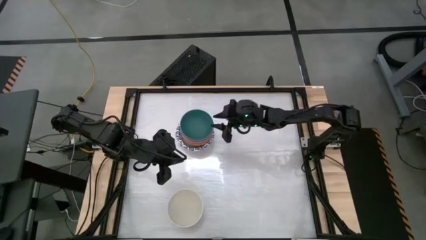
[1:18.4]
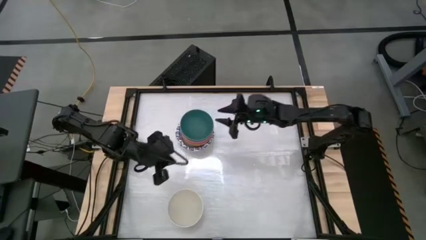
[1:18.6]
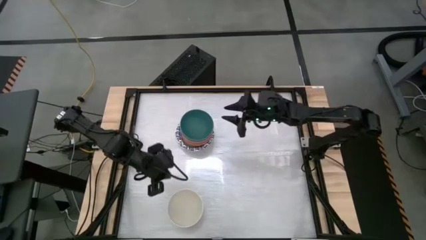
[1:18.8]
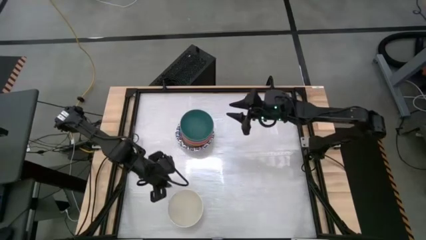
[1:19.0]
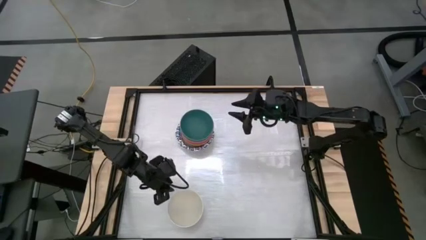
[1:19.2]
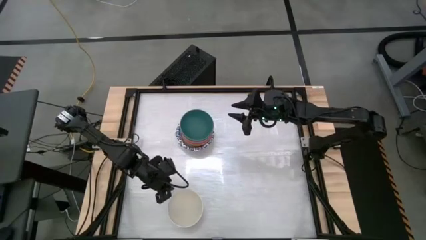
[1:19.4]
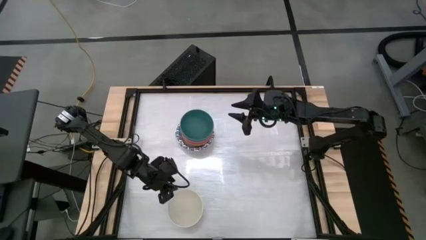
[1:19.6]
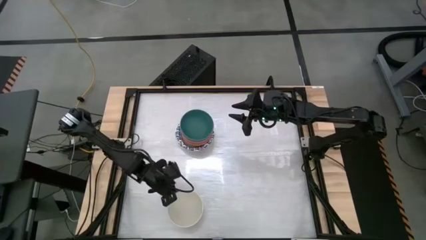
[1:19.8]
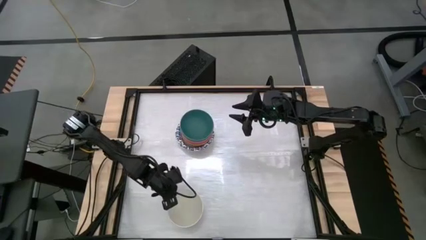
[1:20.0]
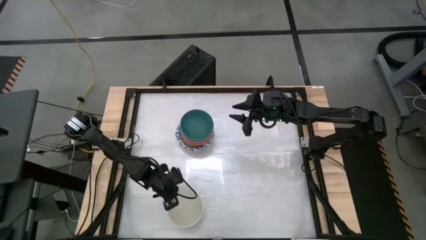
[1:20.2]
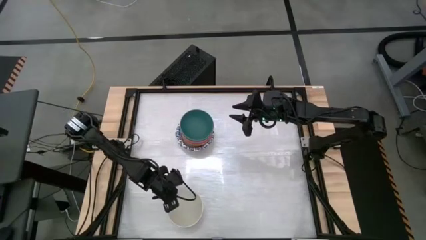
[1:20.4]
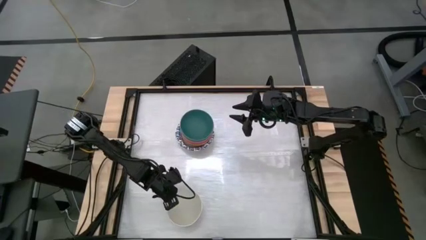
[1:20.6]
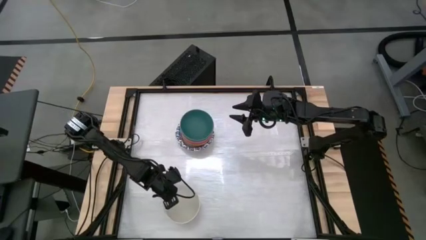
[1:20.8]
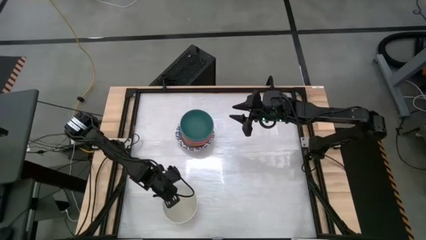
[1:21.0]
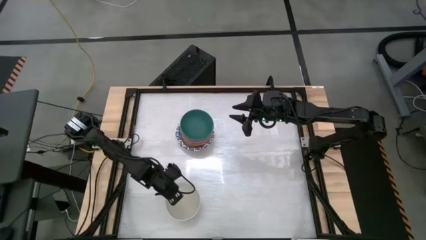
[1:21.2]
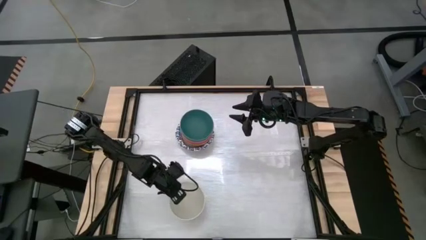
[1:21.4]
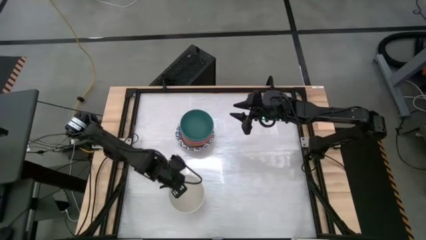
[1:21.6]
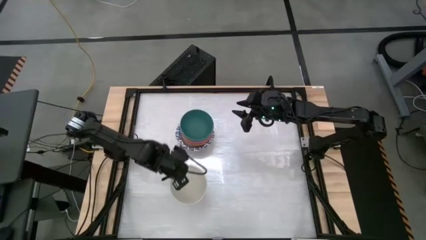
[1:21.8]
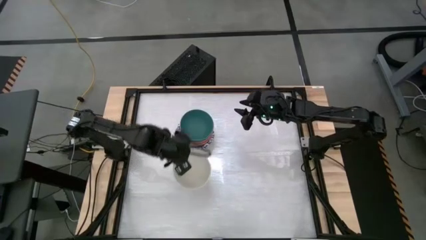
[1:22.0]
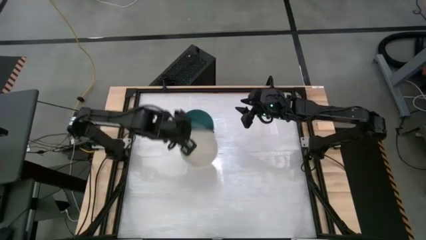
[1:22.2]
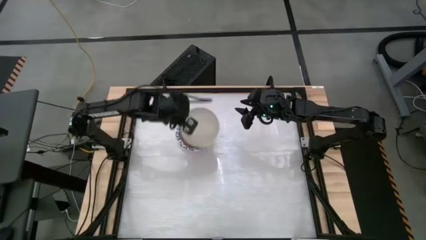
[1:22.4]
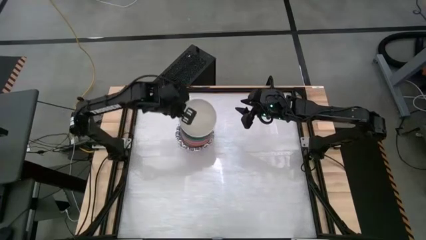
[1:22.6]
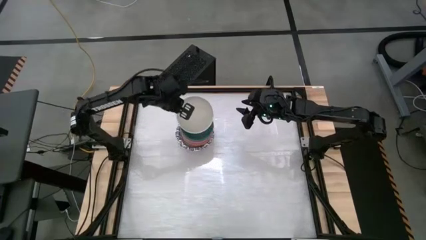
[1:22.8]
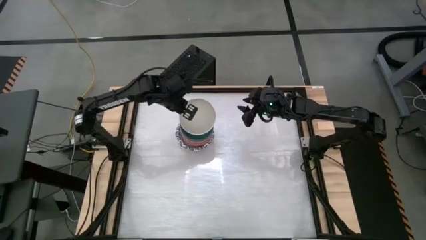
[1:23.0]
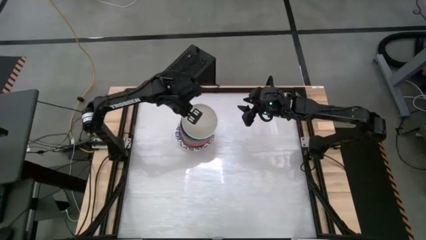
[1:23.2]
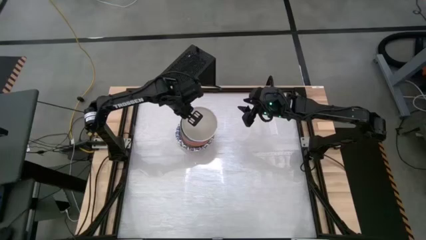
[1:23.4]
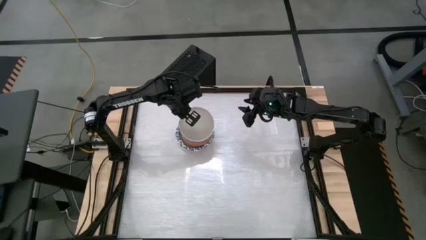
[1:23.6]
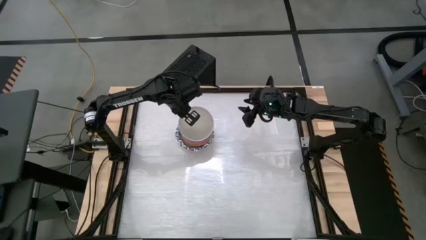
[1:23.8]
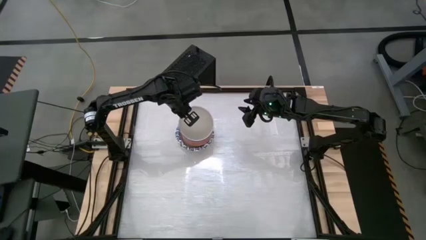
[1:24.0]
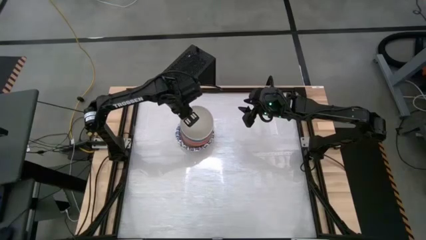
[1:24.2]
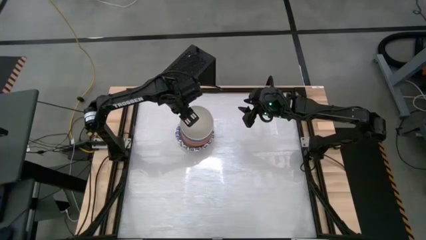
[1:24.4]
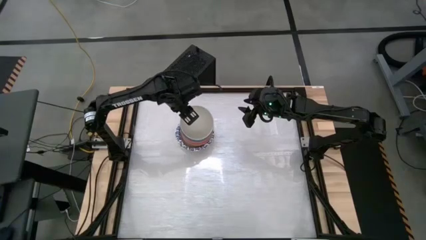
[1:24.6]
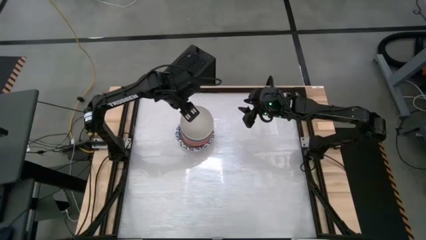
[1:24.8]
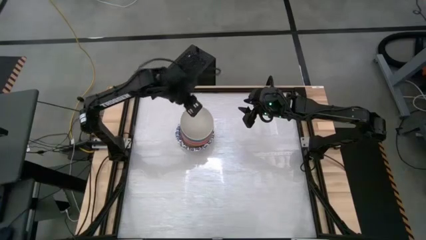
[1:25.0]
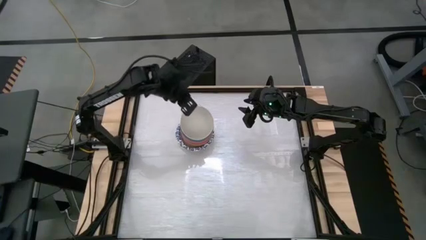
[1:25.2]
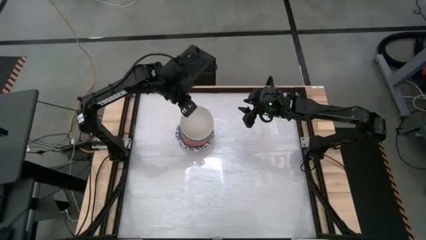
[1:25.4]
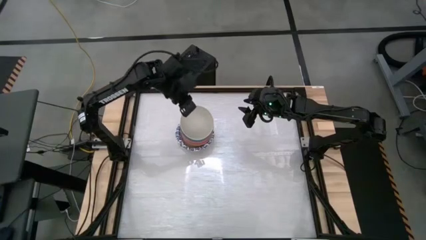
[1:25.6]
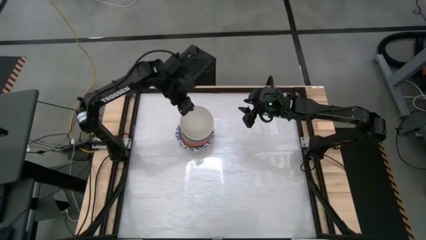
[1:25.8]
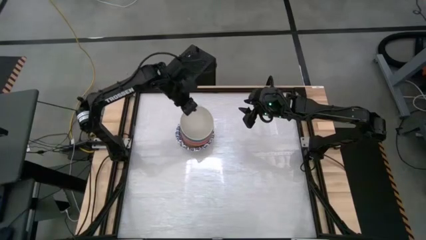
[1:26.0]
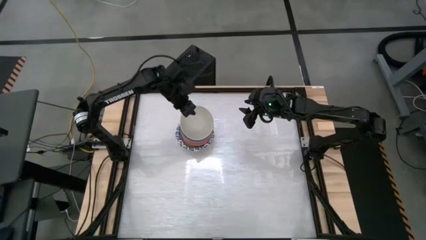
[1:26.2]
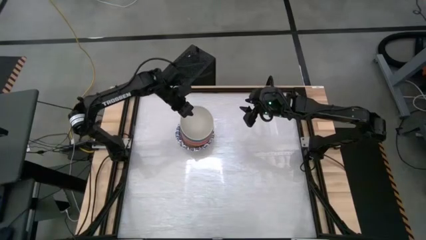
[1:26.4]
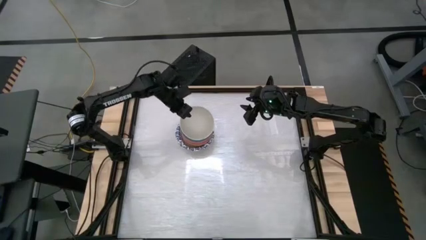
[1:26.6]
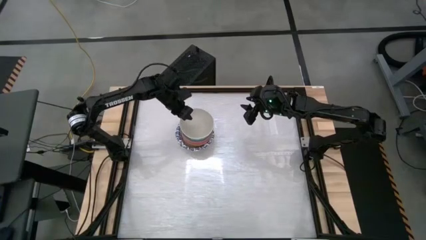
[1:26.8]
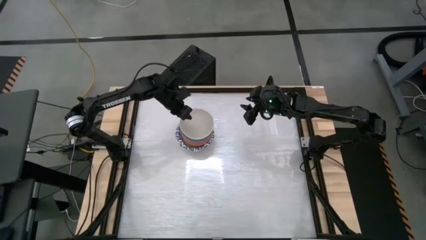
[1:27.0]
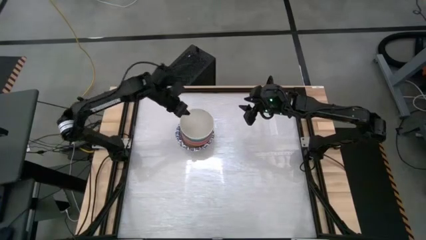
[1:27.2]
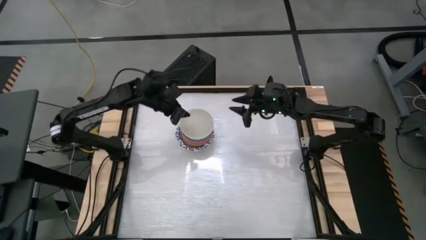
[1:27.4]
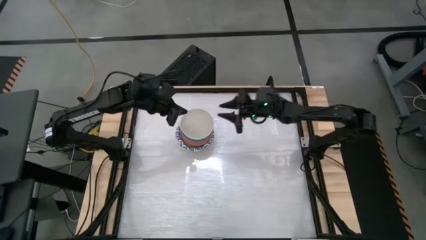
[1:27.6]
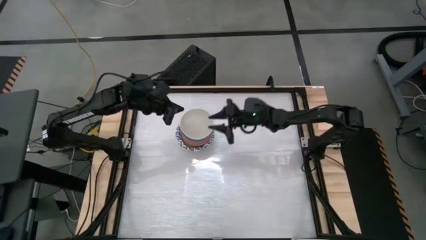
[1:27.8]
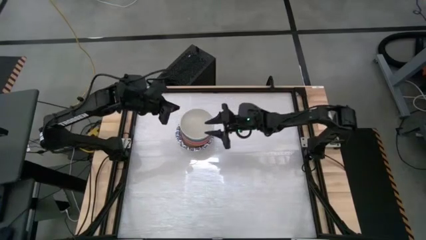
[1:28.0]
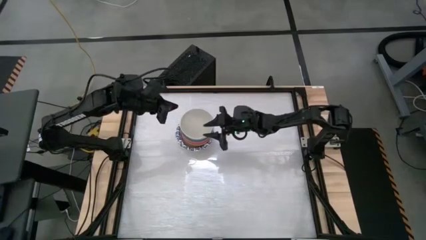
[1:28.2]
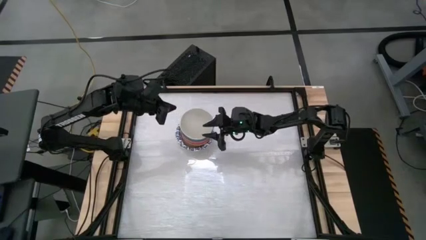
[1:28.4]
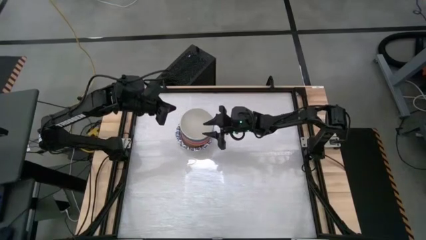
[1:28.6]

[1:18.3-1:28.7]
Stack the white bowl on top of the green bowl
